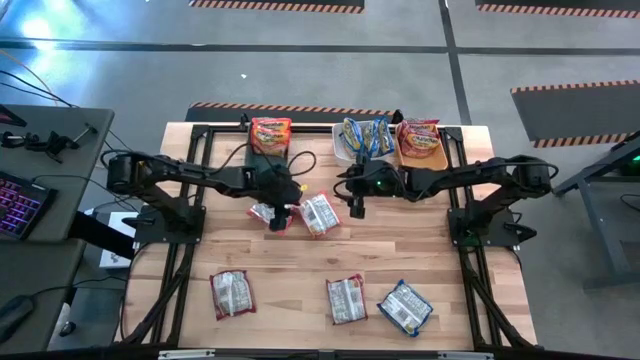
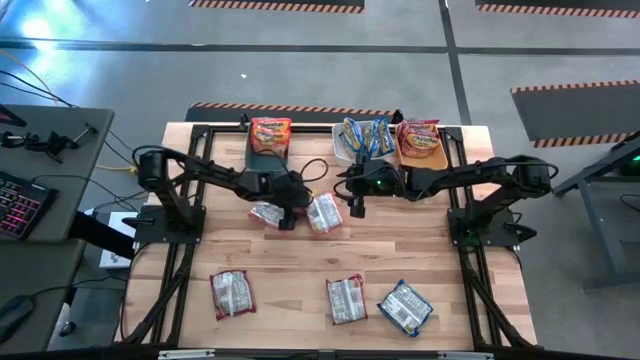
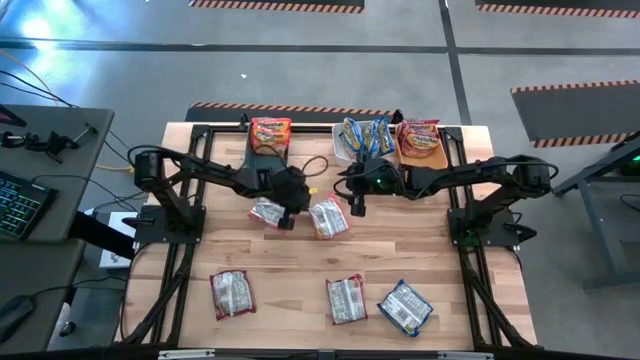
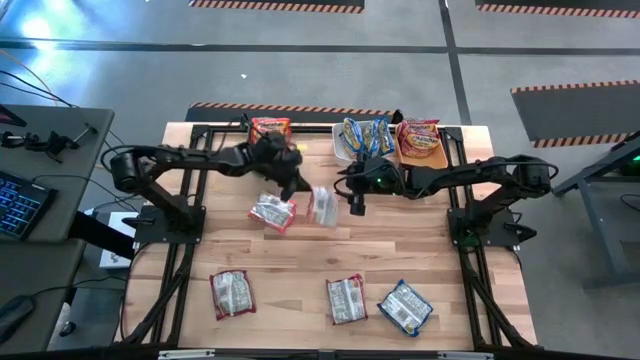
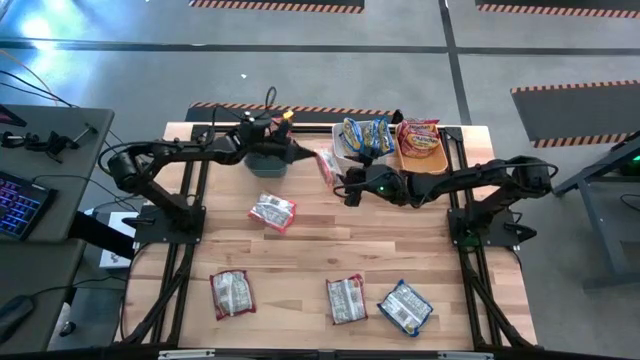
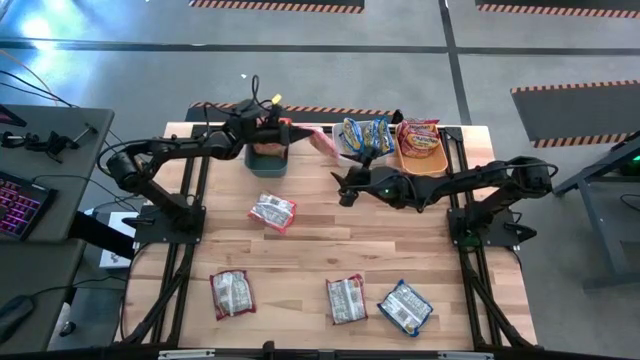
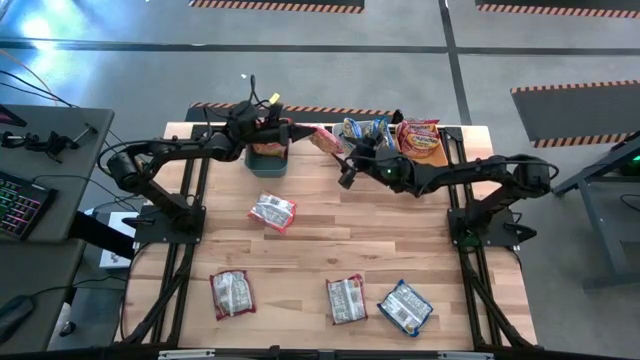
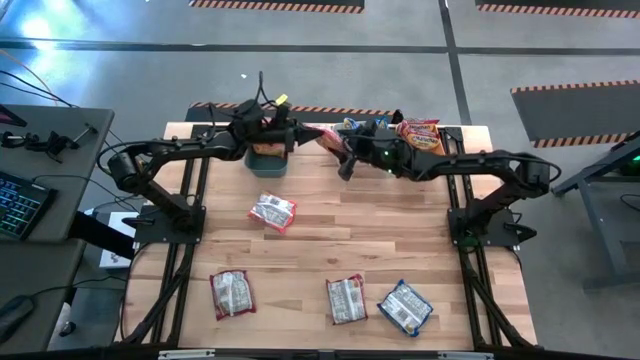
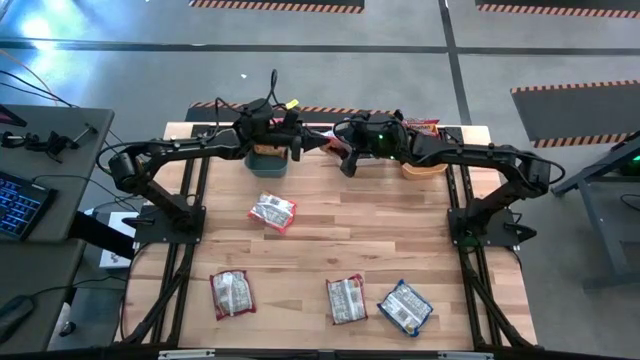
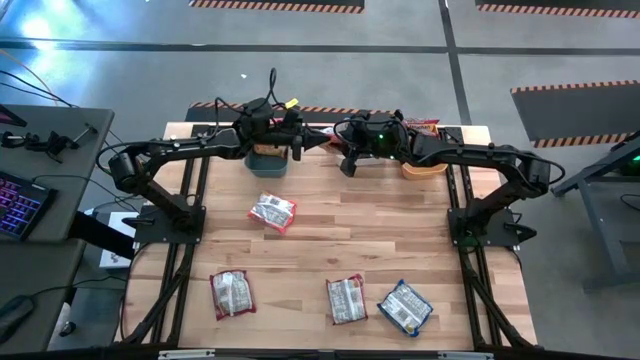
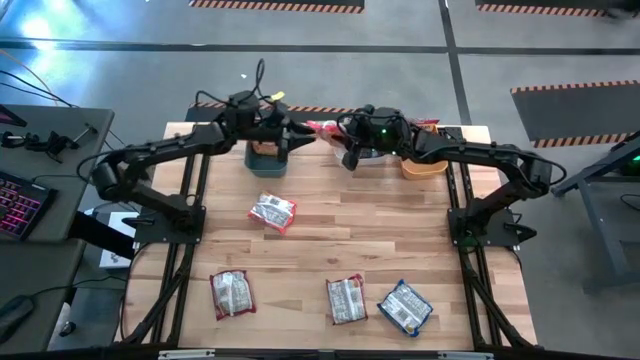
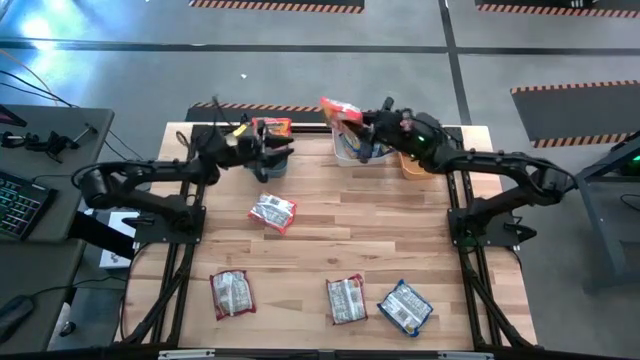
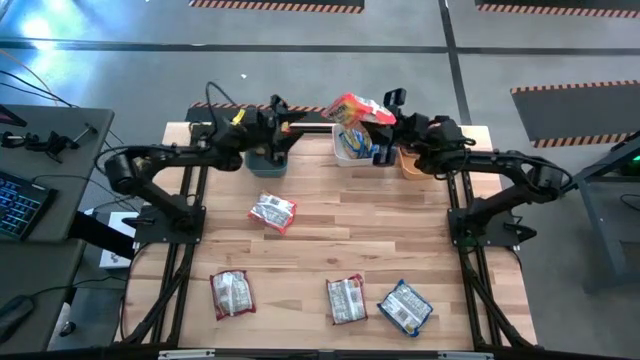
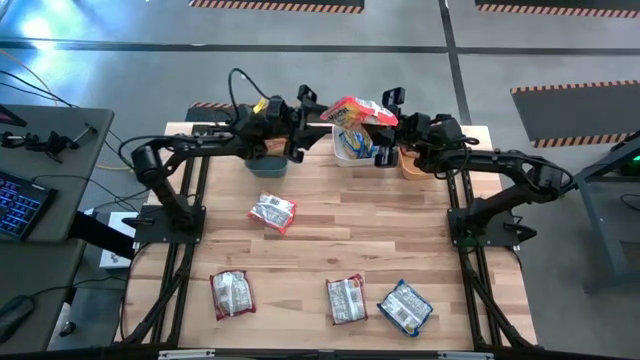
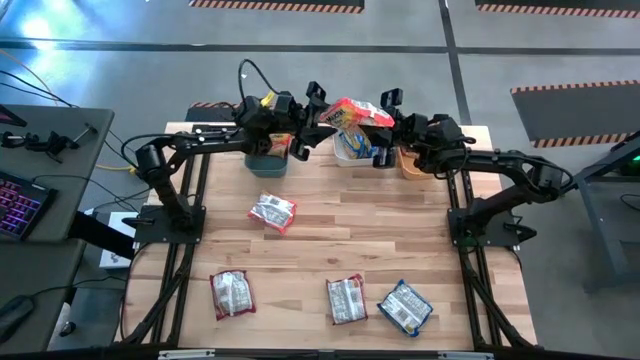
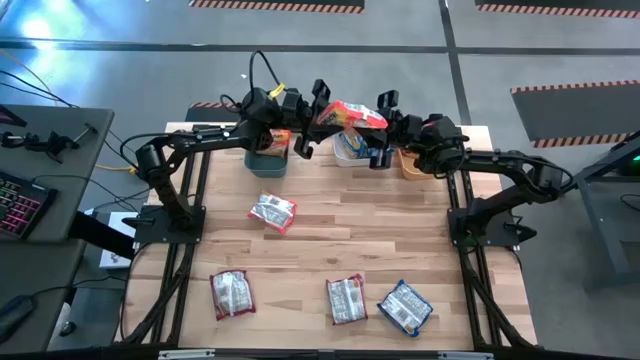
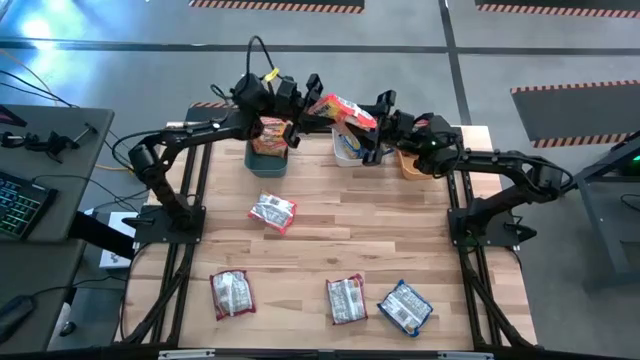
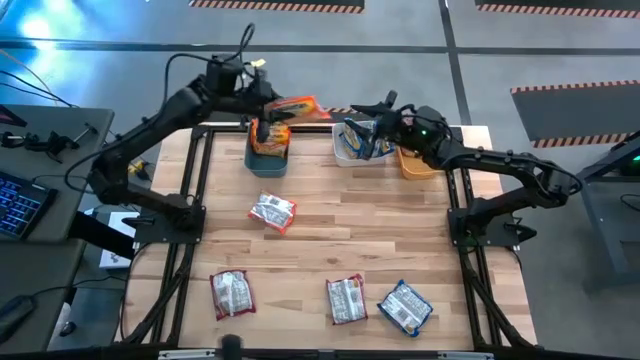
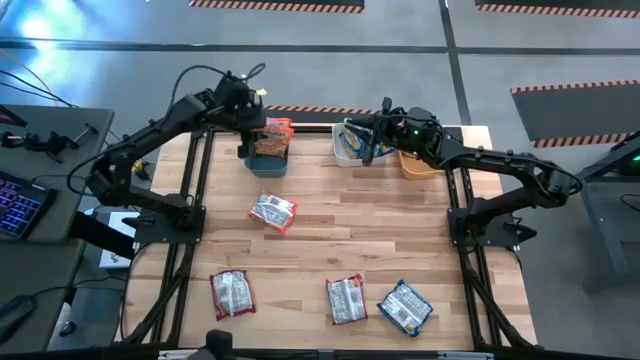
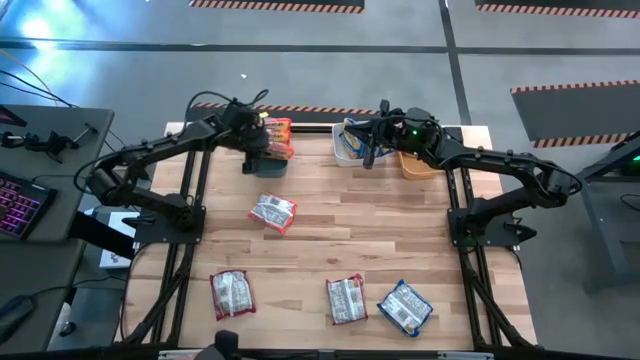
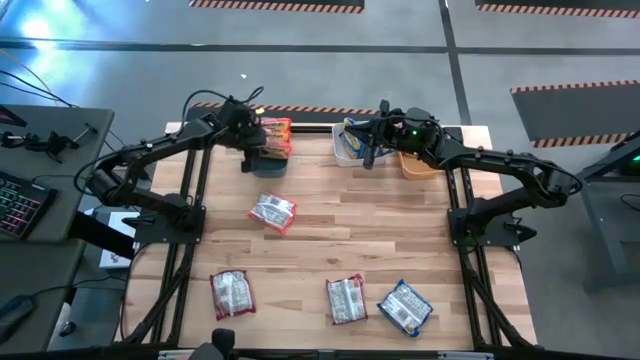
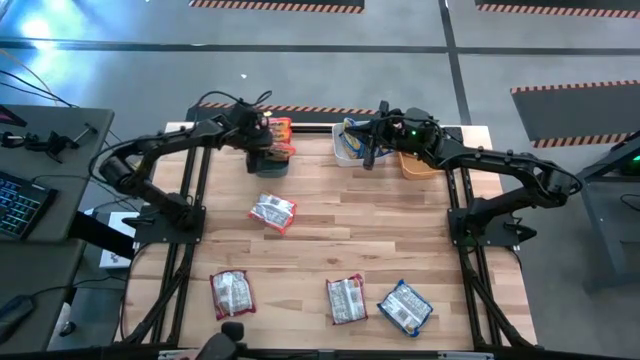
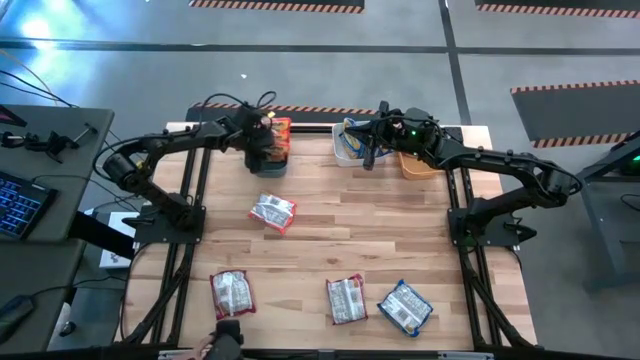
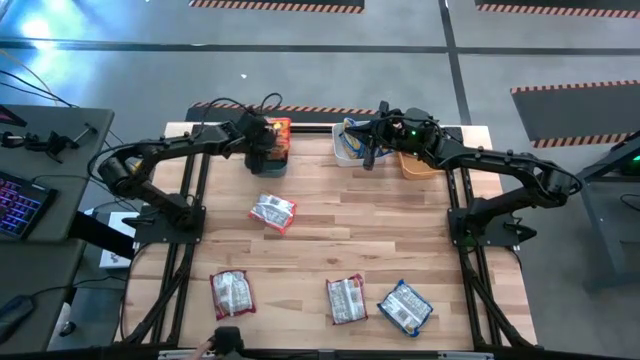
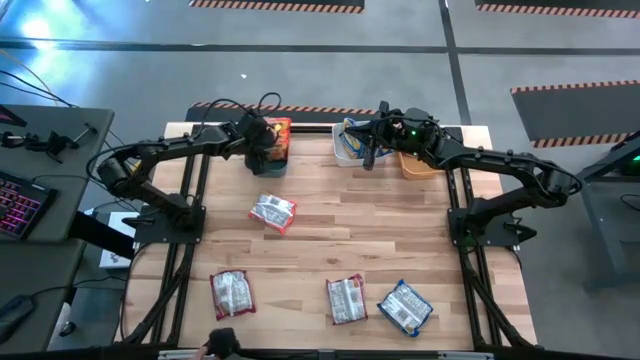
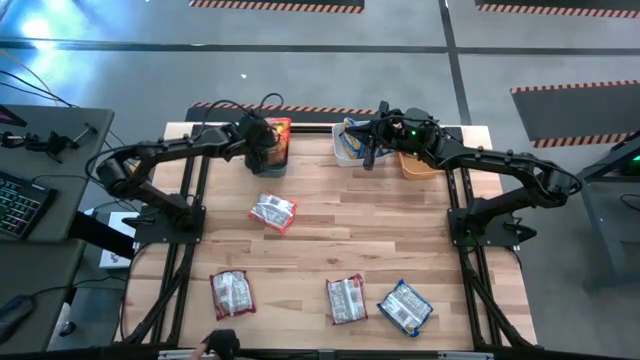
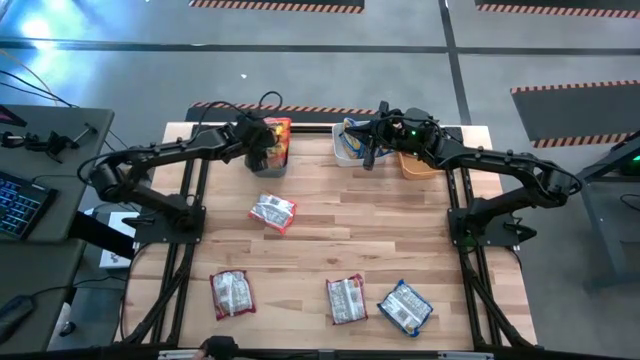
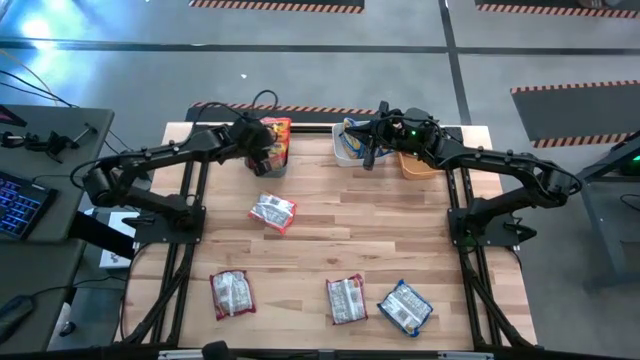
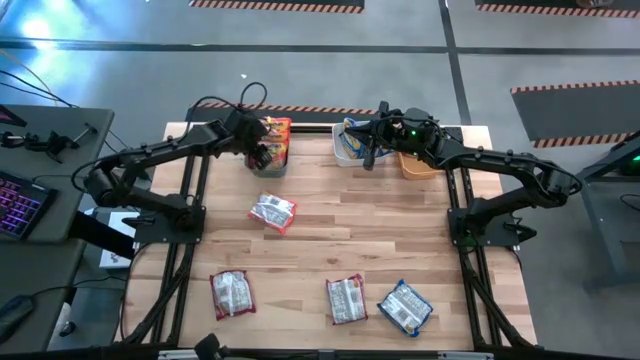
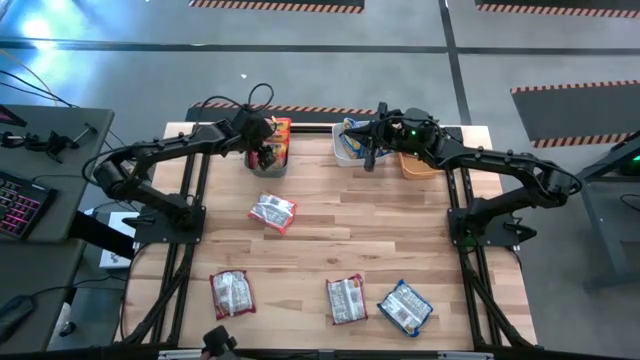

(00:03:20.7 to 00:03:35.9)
Task: Sort Maruchan noodles
Put the right orange noodle pack into the blue bin

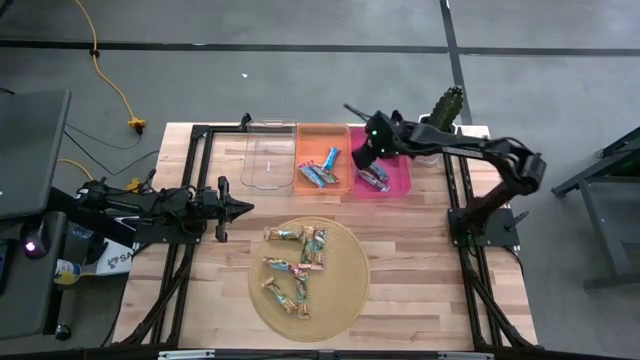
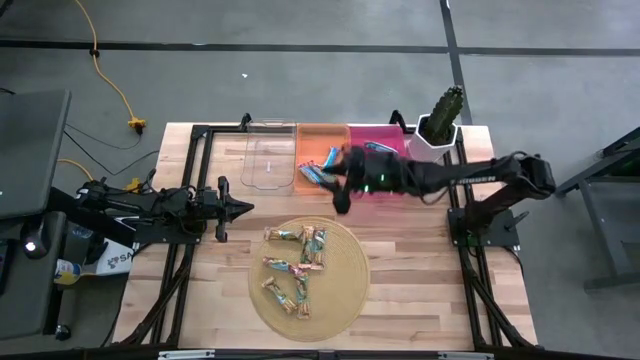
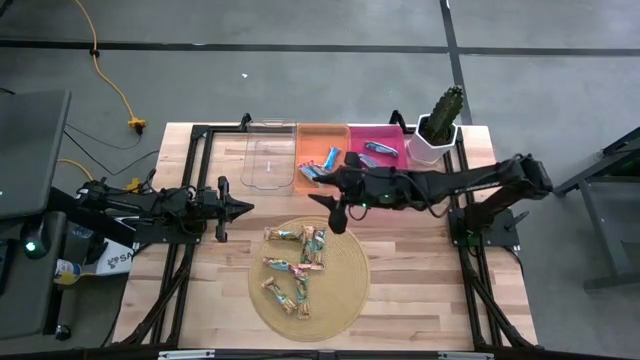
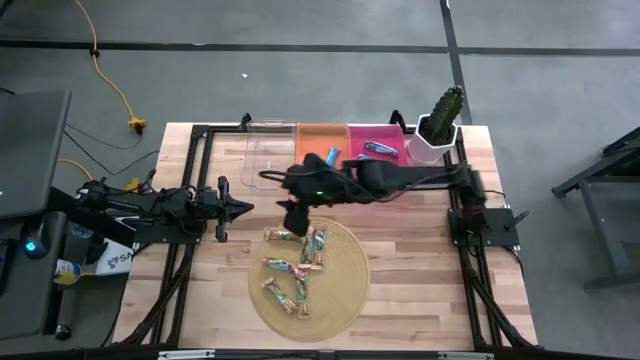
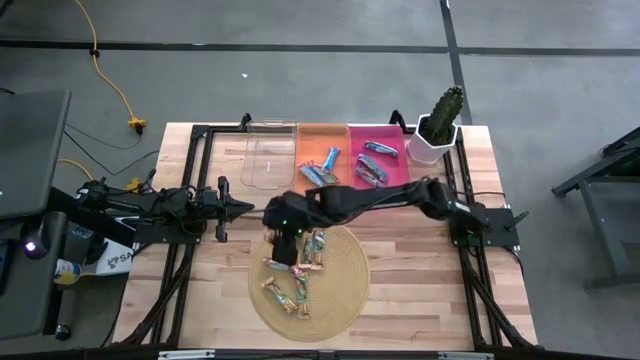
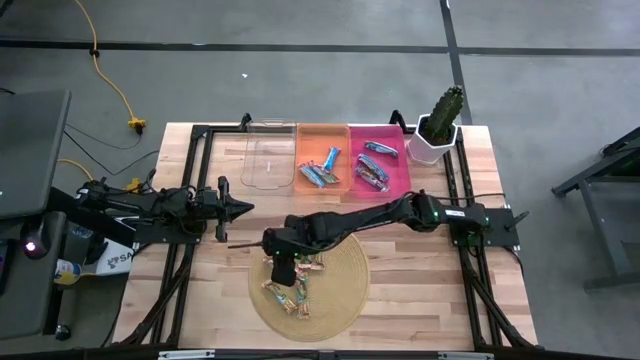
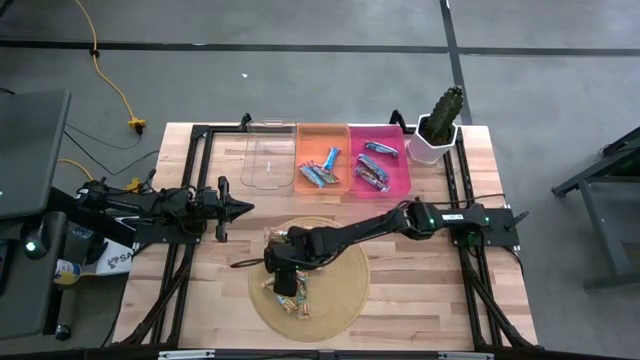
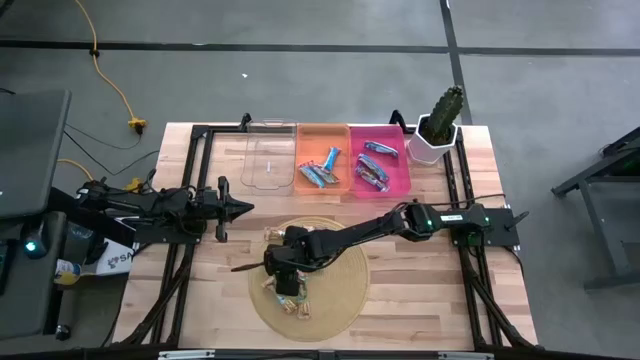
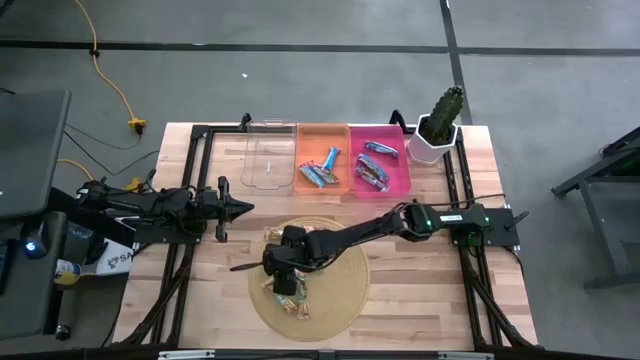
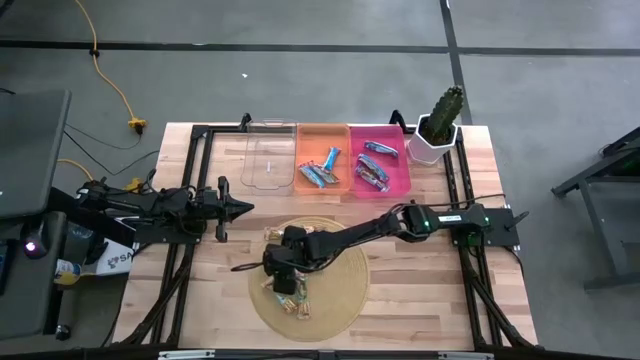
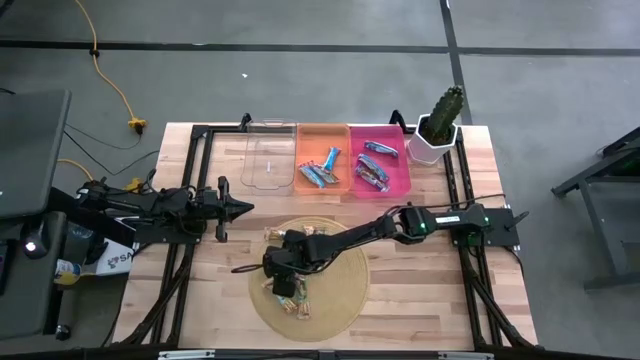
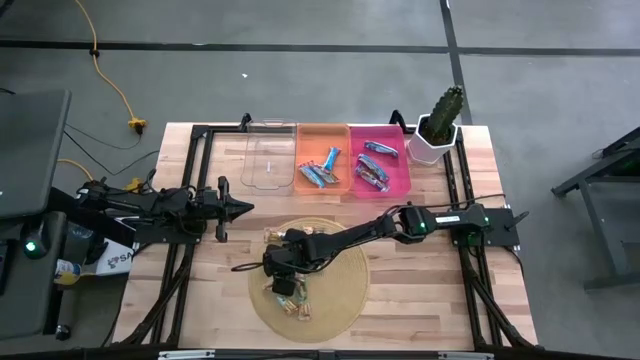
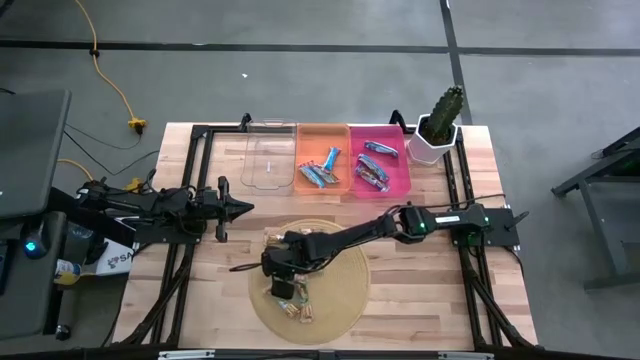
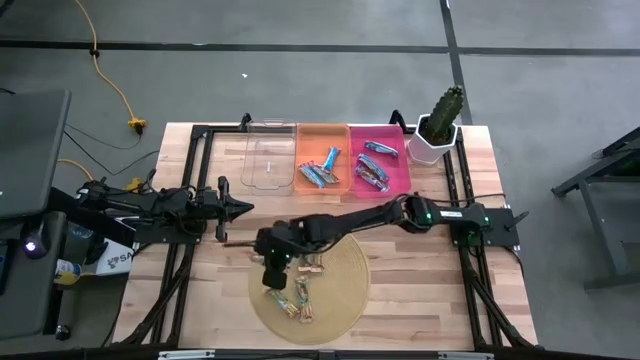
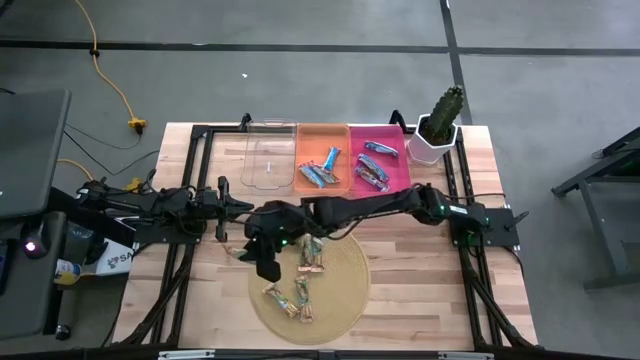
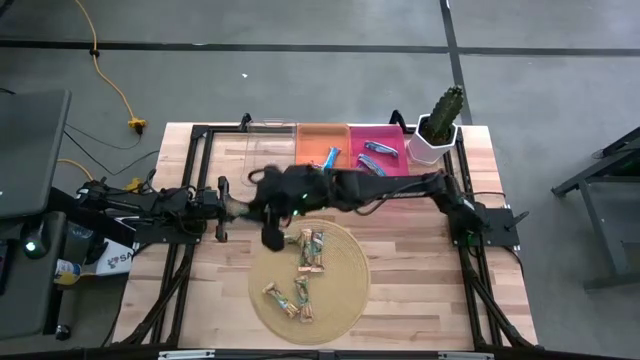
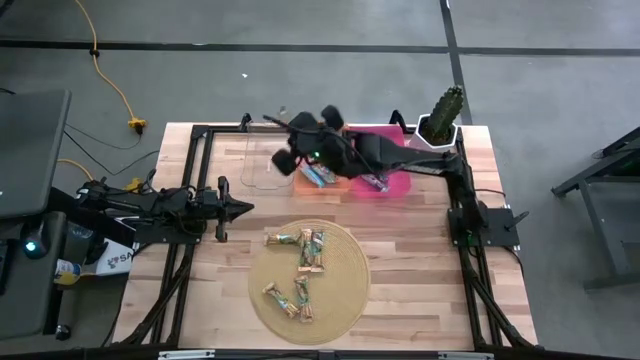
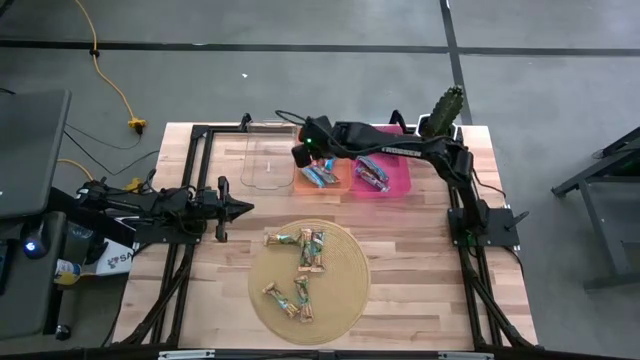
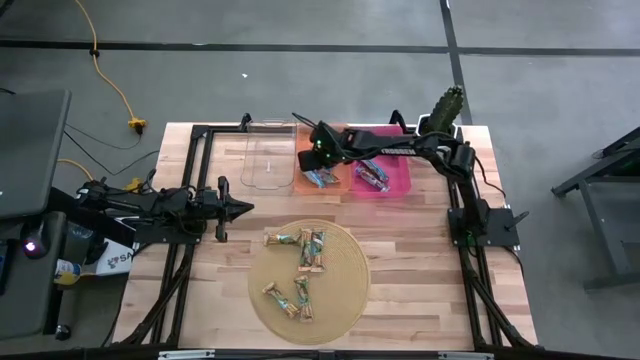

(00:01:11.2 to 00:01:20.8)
Task: Pick and place Granola Bars by type
Put the red granola bar into the orange bin
